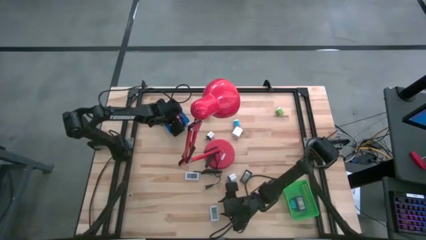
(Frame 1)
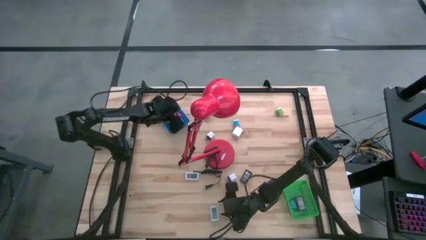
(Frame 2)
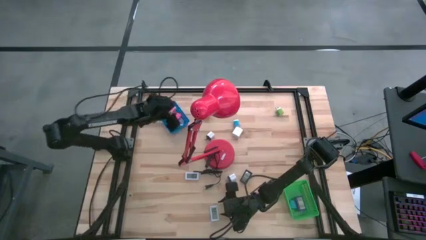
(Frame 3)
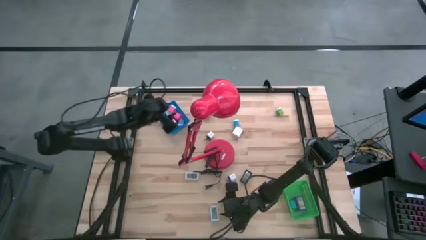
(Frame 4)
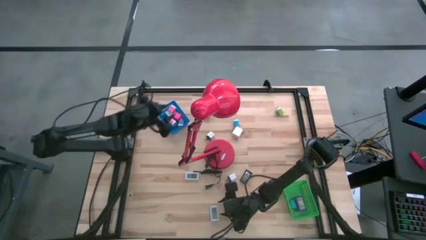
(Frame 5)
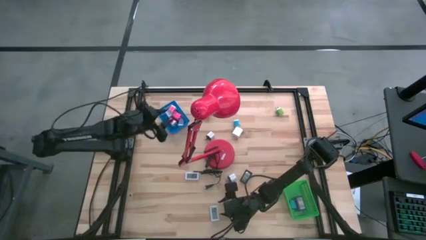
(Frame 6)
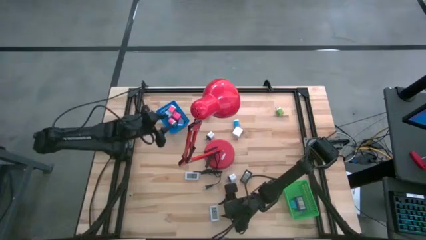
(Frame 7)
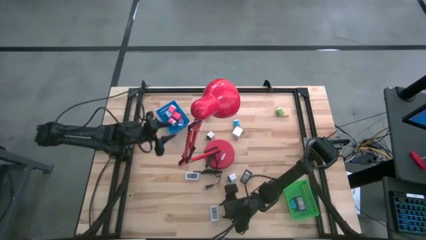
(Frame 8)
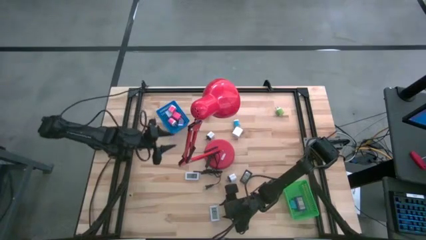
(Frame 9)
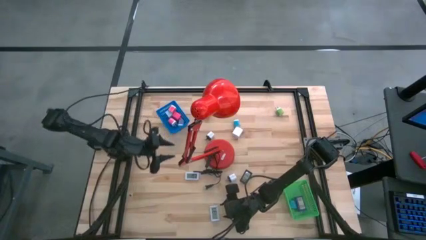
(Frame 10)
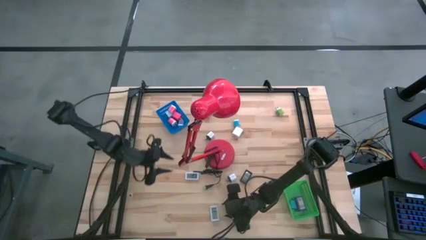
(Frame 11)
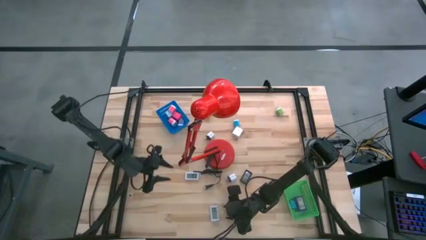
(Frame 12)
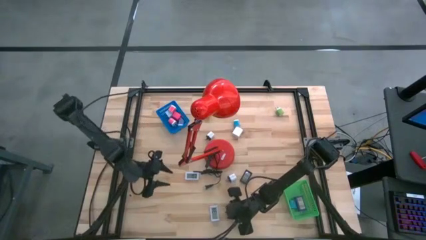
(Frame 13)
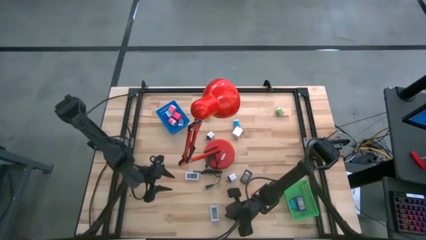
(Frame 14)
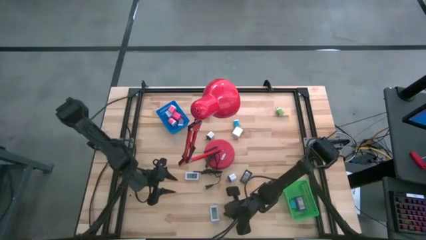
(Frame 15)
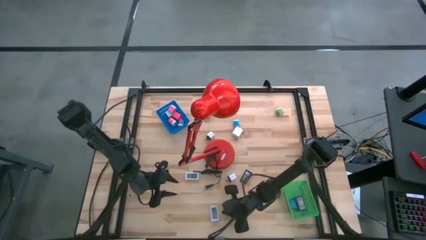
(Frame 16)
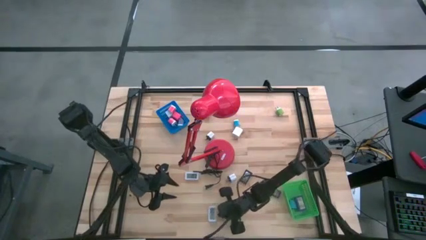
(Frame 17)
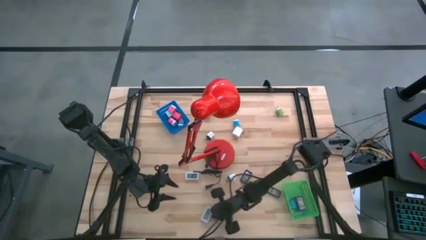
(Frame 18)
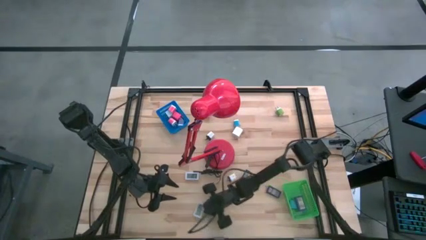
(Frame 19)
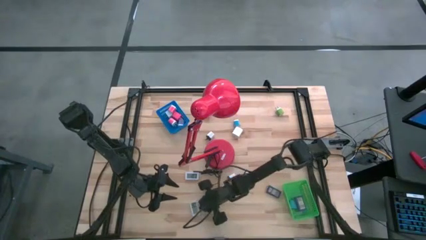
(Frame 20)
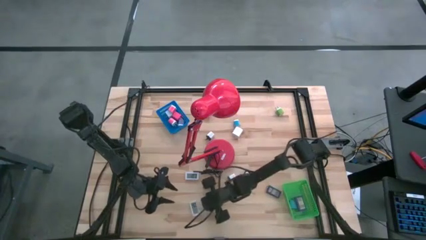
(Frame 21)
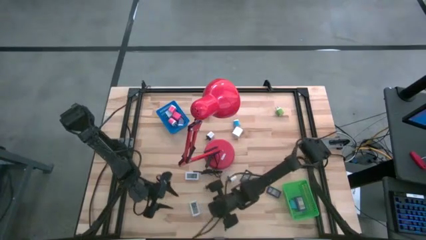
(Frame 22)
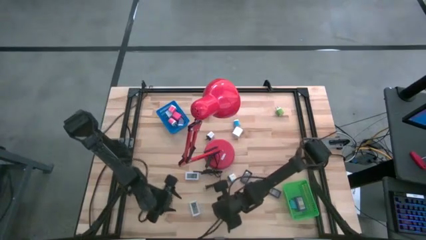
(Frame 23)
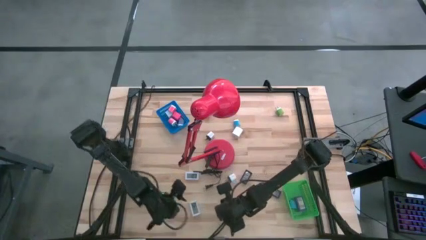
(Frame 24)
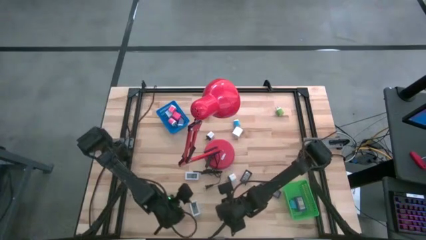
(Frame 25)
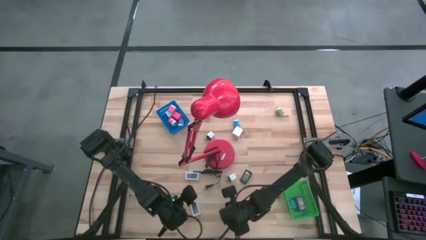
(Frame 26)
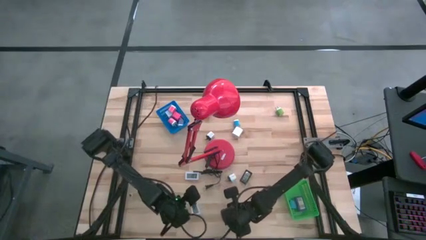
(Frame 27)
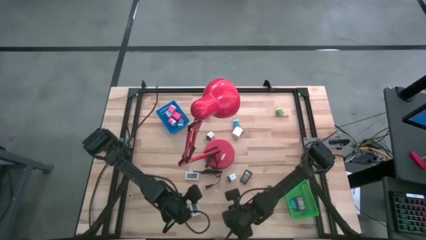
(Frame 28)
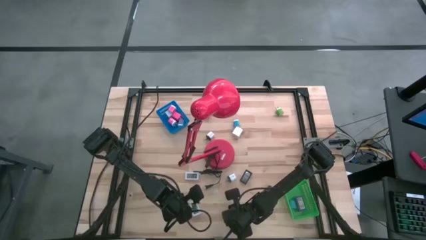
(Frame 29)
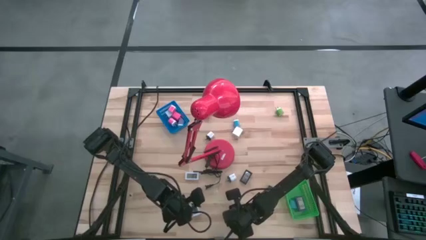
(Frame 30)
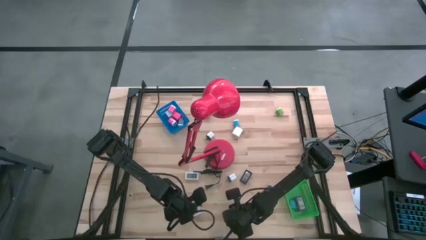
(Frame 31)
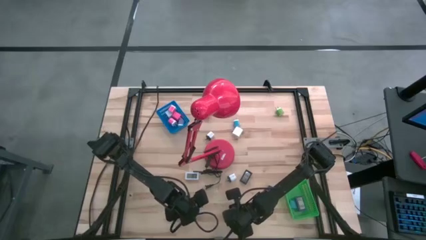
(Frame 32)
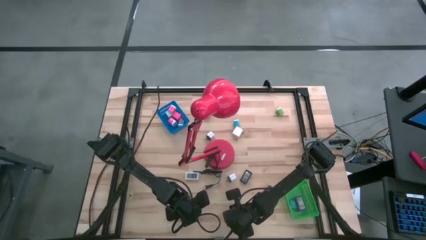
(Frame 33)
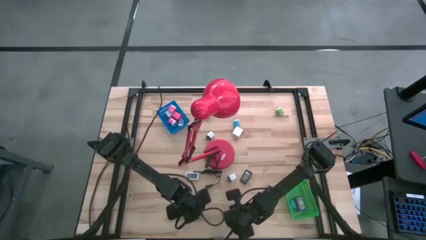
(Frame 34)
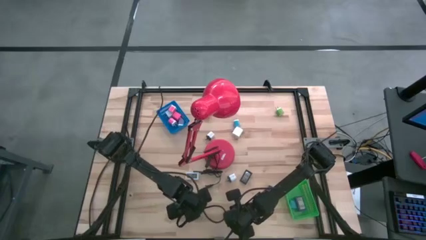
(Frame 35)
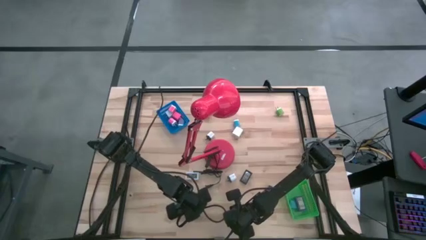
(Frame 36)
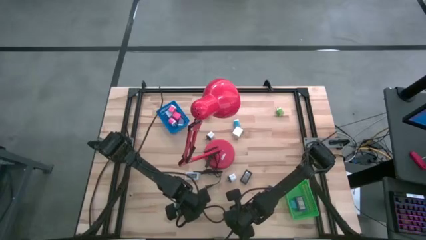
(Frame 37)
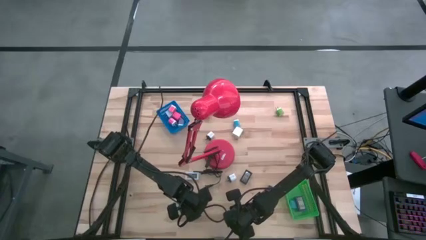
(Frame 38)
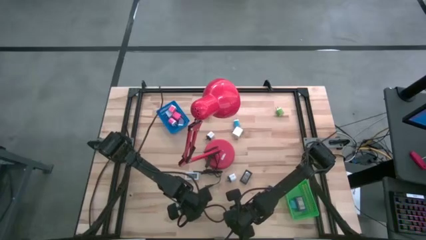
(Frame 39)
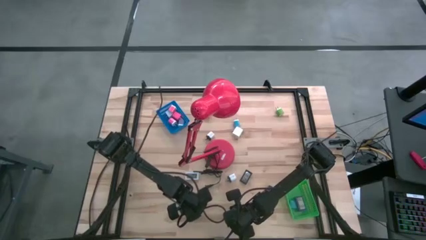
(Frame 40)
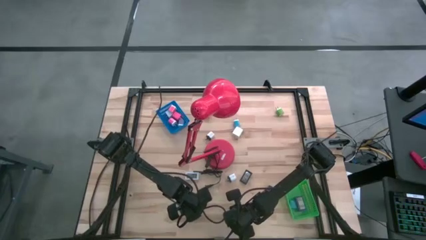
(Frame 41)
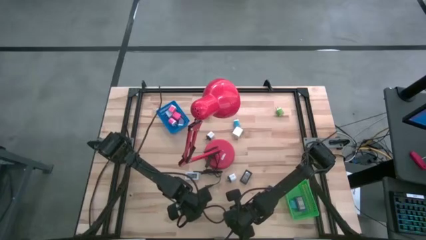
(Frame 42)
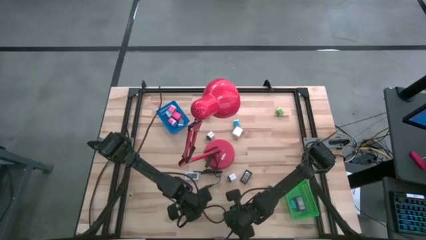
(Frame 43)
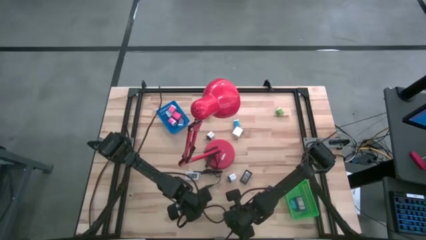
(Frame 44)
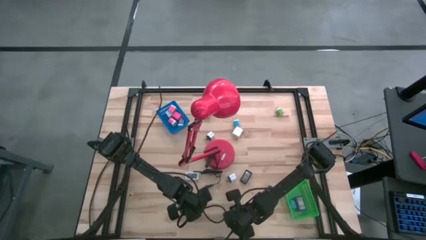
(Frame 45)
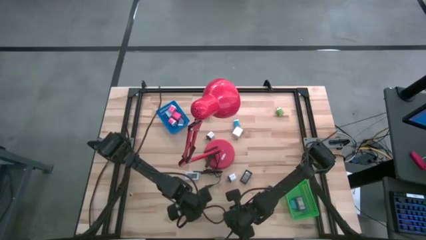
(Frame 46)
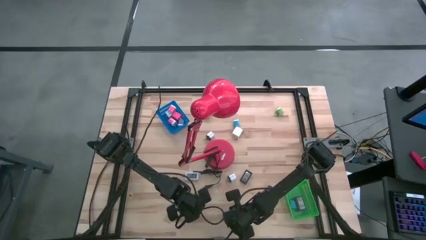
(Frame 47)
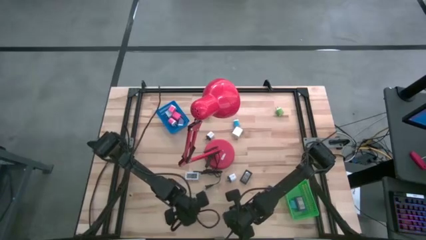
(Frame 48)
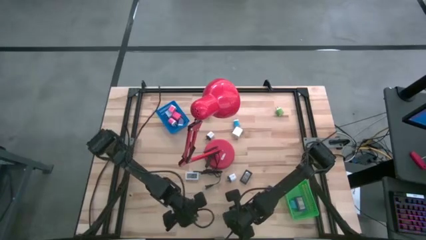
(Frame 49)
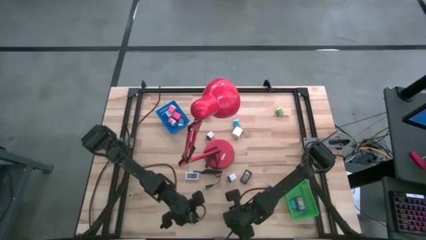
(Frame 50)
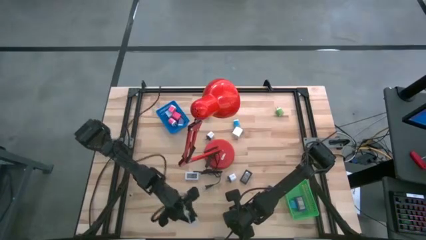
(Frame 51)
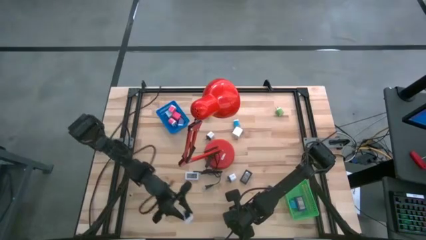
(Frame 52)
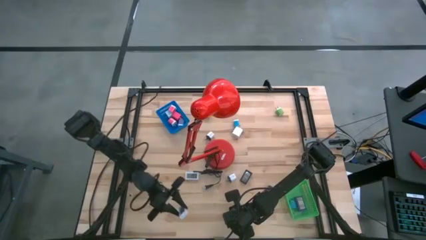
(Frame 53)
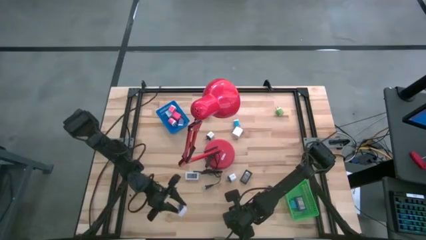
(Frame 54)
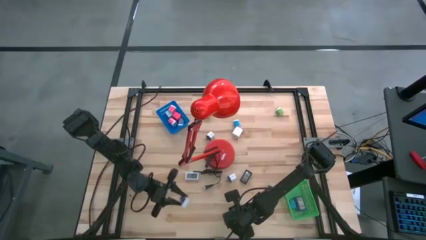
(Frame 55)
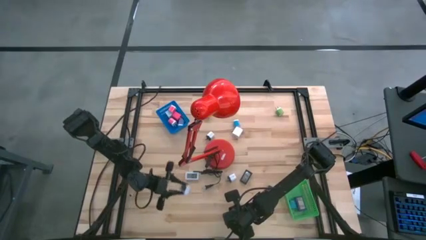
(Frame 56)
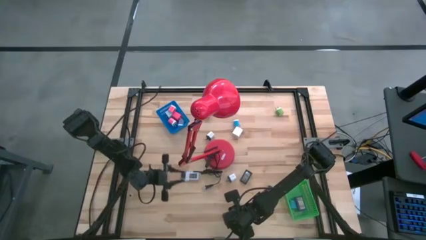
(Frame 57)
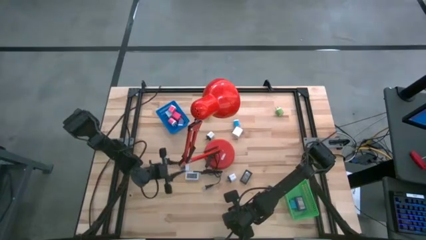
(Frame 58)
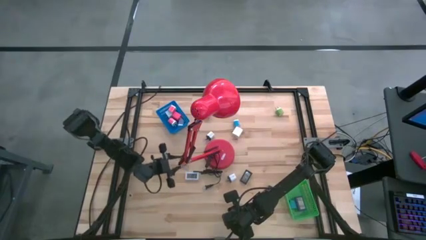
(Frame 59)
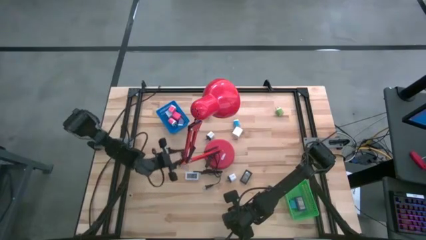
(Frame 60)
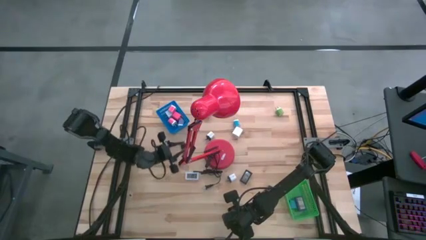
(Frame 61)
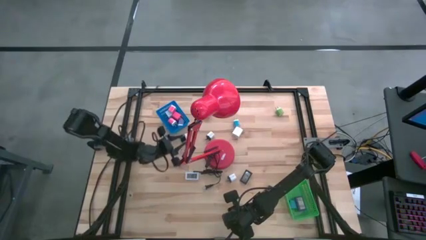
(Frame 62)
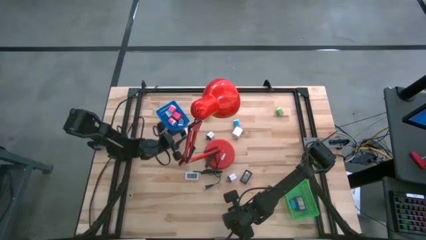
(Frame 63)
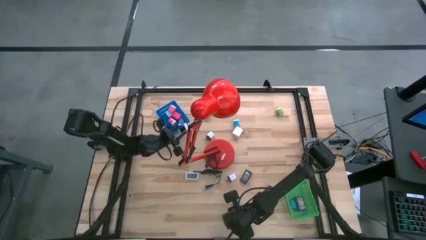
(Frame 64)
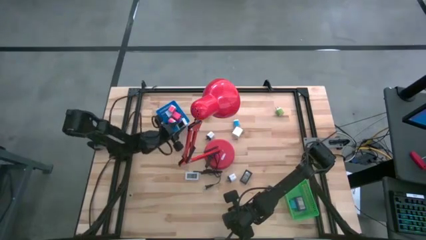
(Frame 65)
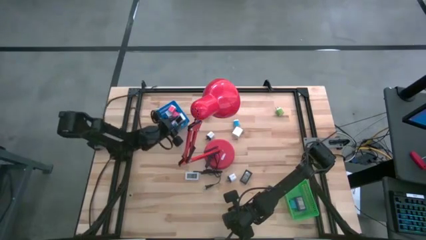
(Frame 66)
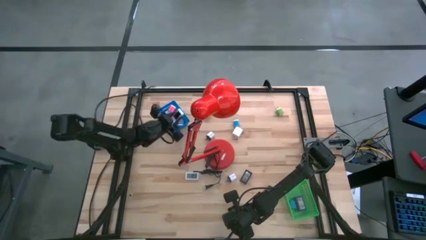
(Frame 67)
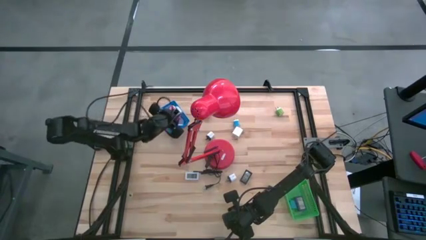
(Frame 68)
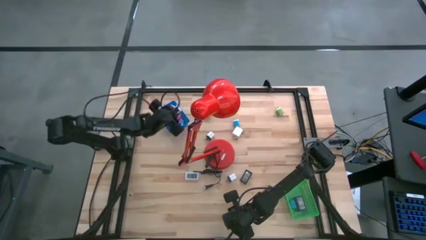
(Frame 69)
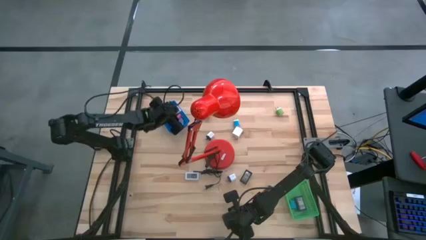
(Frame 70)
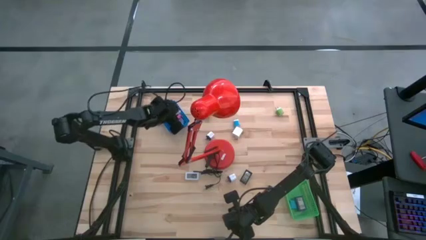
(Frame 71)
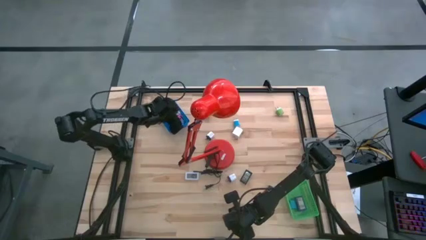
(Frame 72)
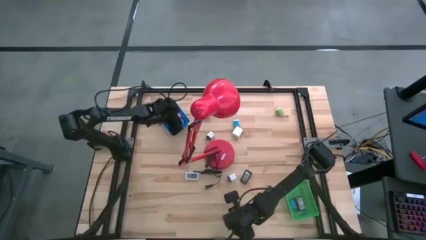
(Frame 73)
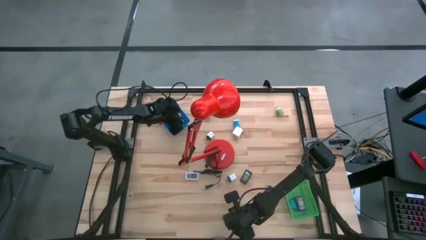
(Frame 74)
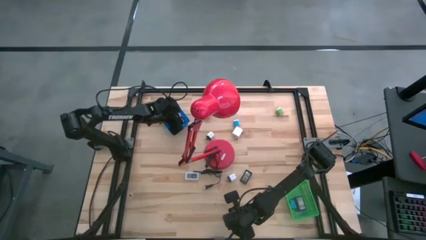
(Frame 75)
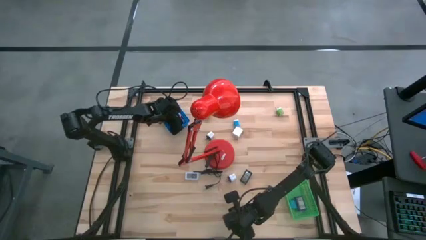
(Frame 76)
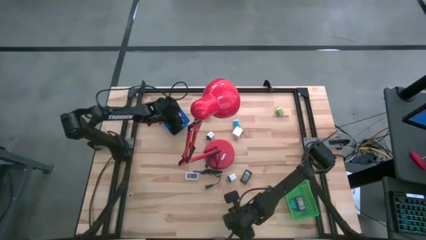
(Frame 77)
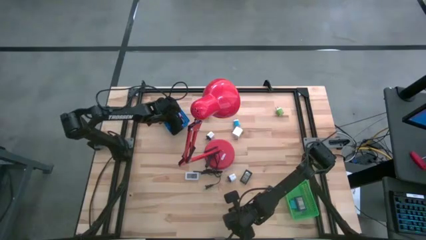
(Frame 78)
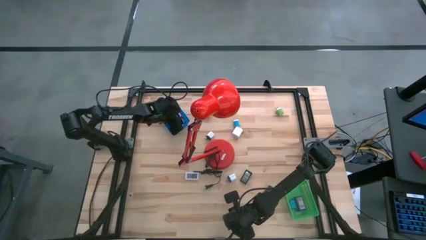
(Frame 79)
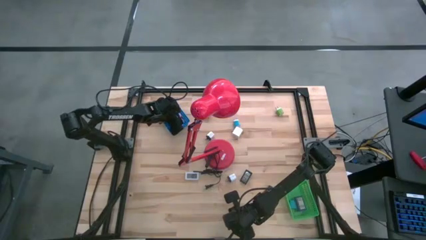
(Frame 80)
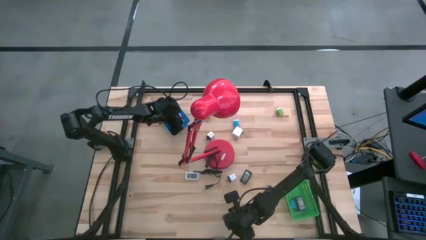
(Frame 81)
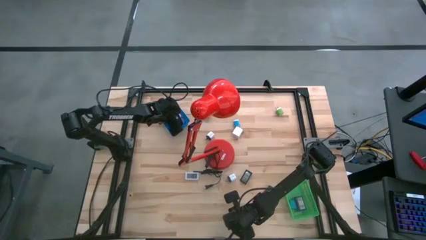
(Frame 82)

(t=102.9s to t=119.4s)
Task: Pick & Place Office items
Put the bottom white digital clock into the green bin
